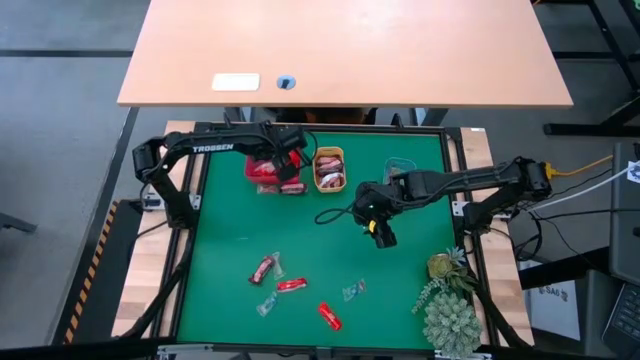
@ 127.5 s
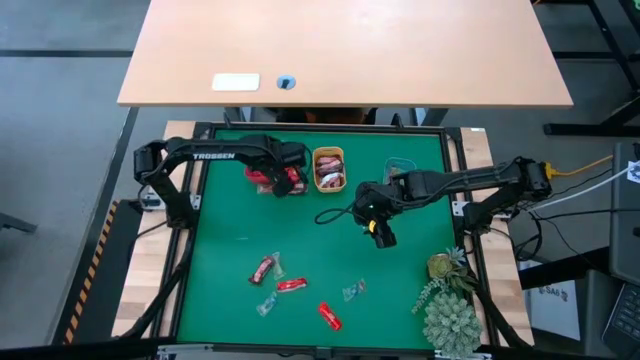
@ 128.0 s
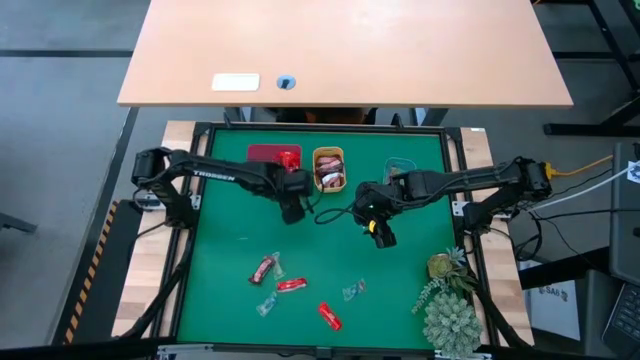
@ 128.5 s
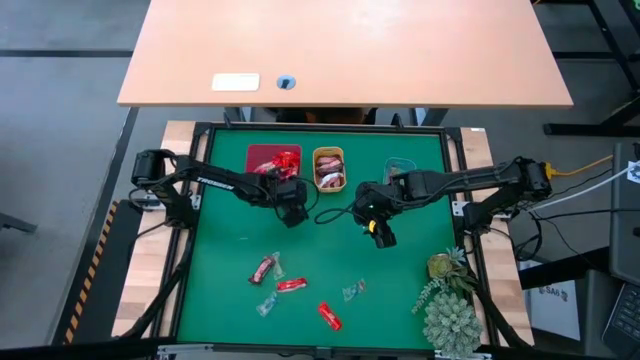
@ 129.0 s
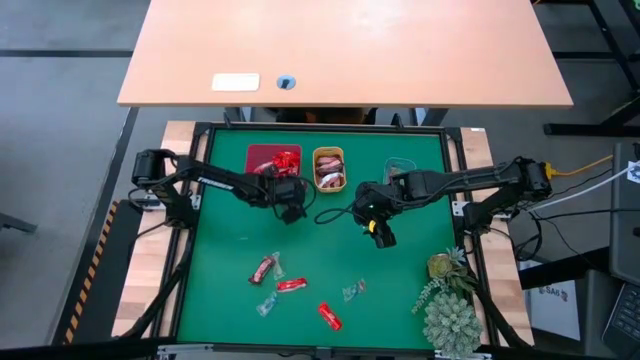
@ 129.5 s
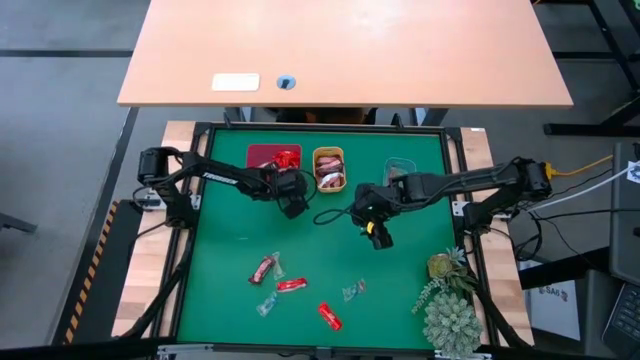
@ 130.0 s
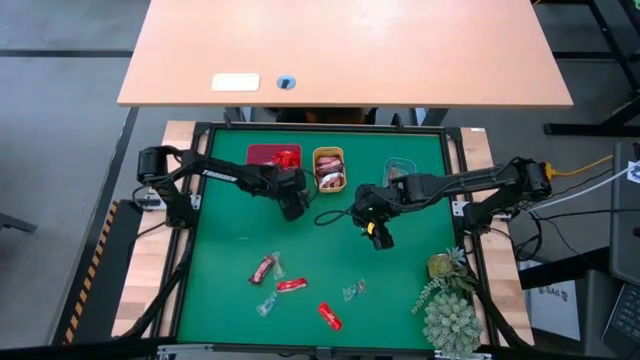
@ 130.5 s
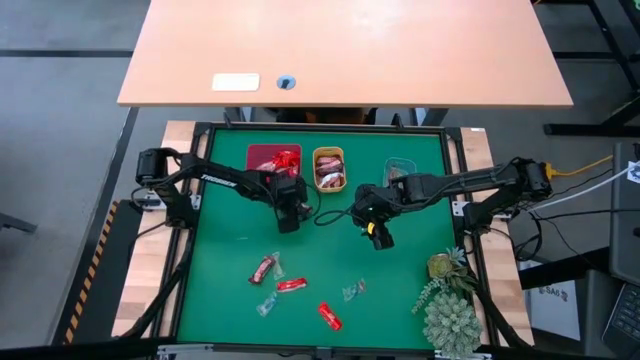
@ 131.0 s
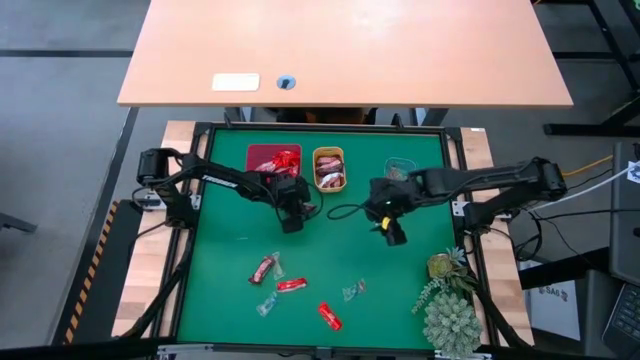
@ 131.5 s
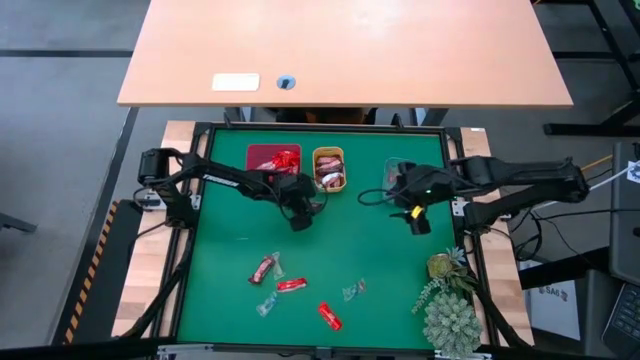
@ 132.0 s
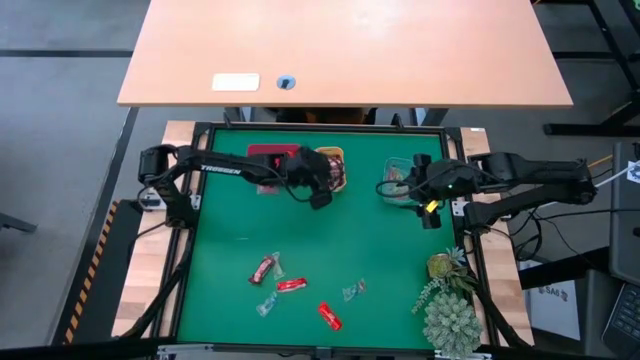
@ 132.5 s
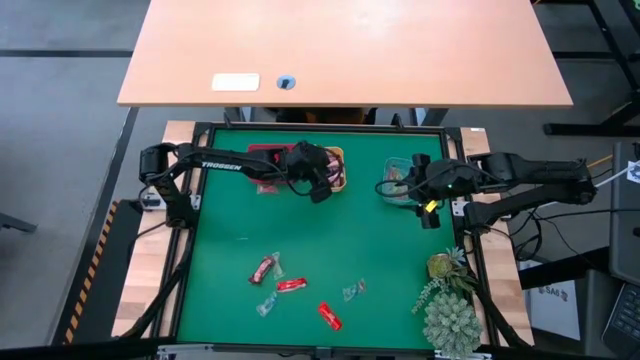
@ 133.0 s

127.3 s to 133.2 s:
Task: Sort candy
Put the brown chocolate bar into the yellow bin

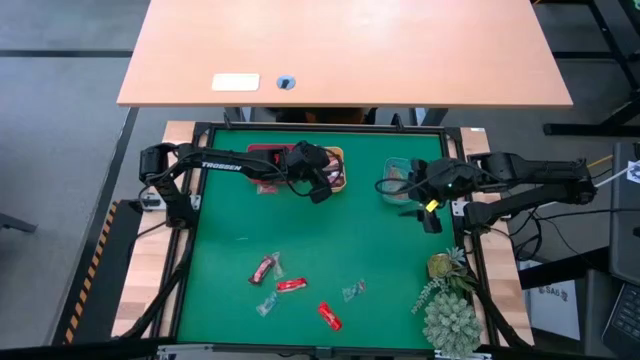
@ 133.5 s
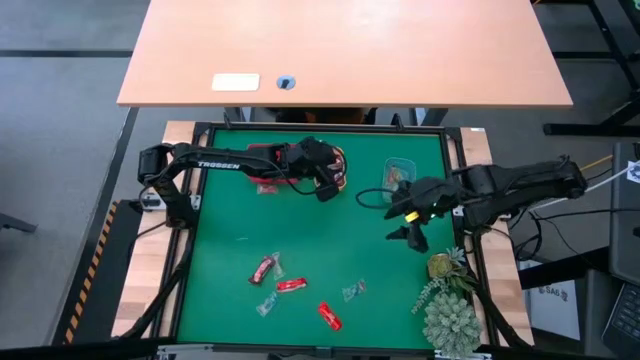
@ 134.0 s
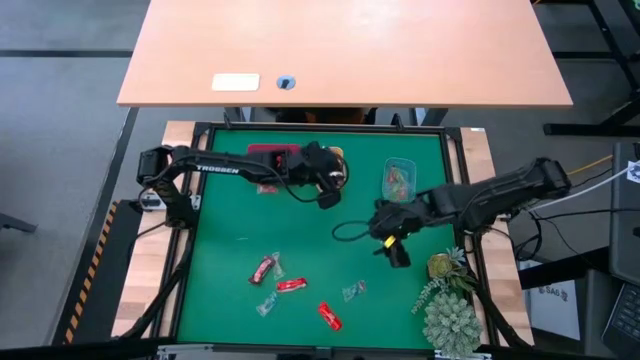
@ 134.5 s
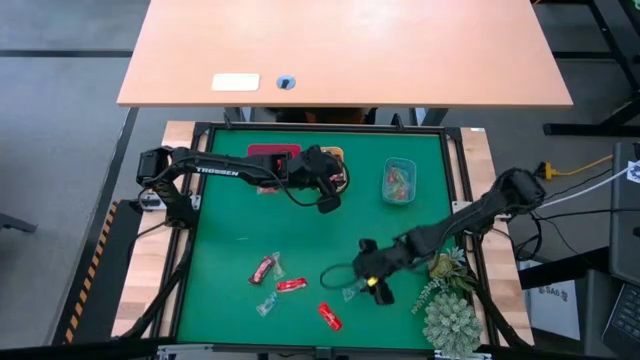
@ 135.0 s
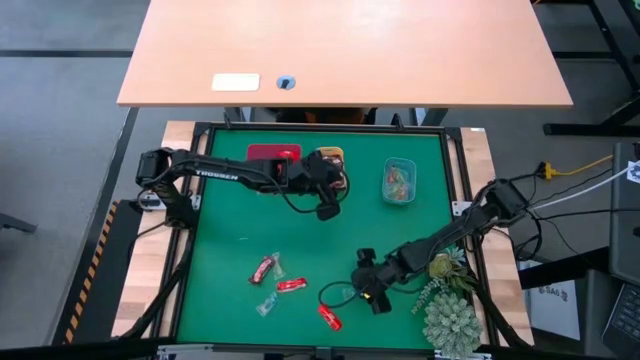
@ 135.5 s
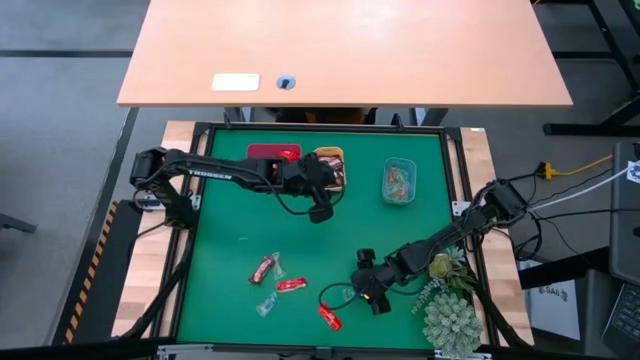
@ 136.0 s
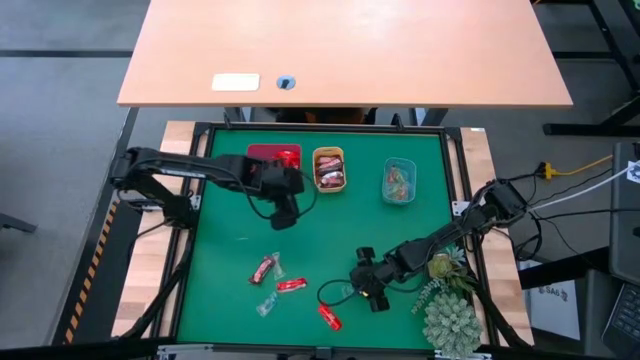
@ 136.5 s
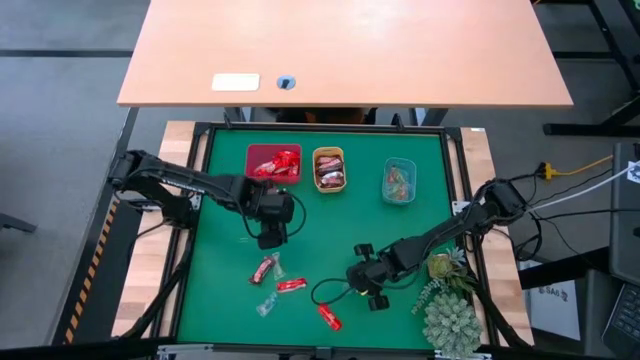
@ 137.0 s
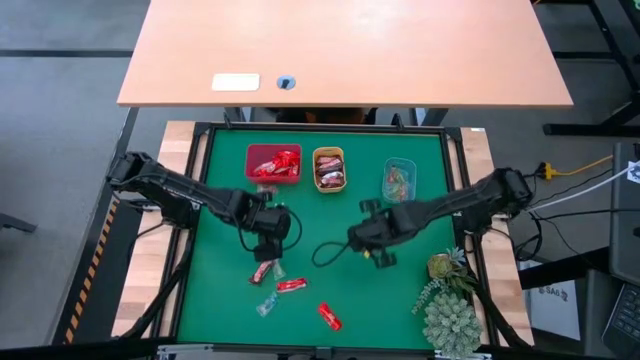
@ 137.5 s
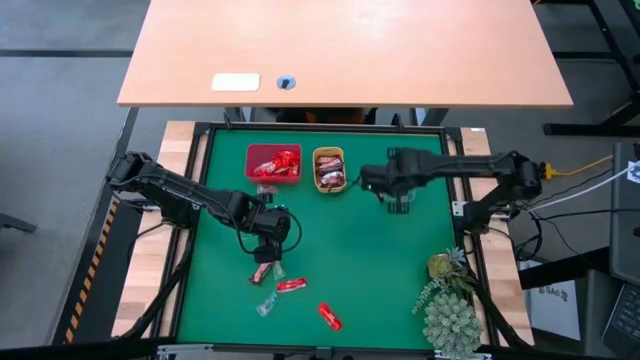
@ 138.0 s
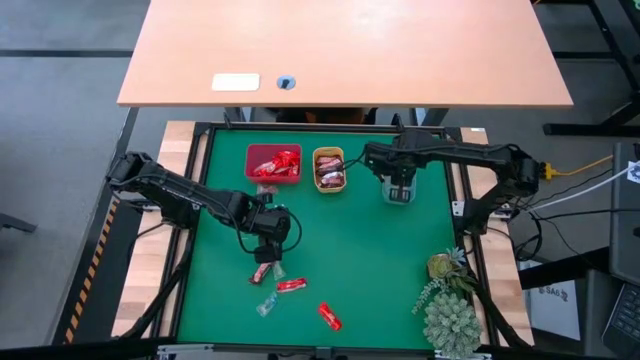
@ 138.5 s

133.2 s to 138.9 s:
Put the blue gummy into the blue bin

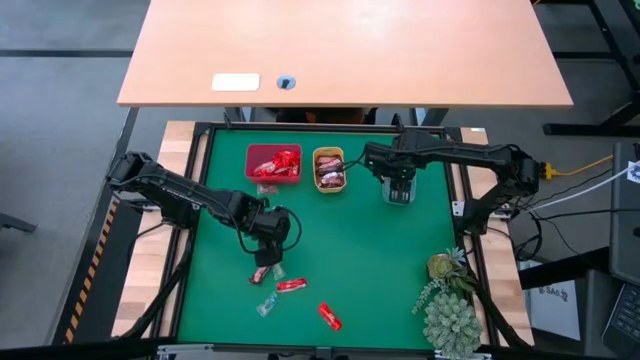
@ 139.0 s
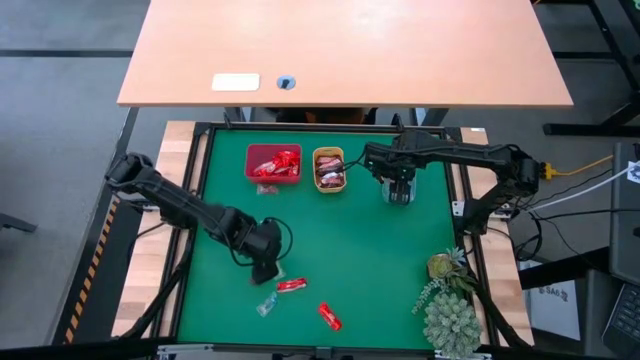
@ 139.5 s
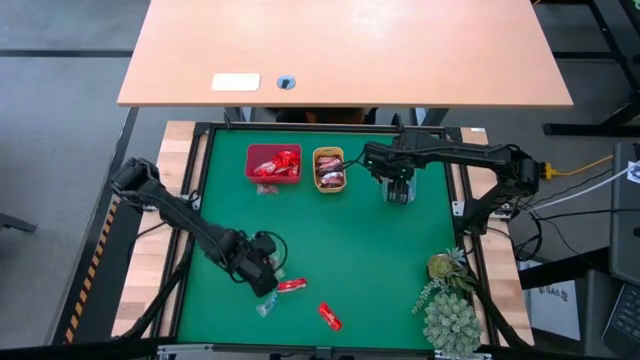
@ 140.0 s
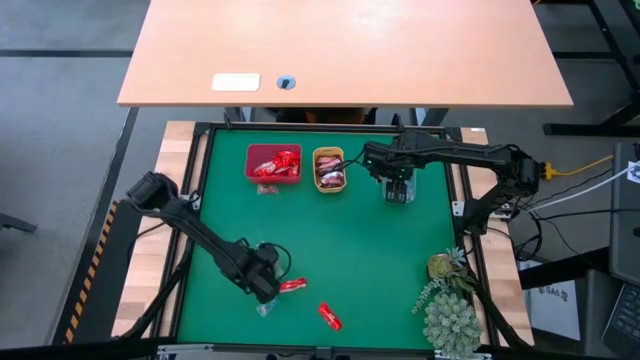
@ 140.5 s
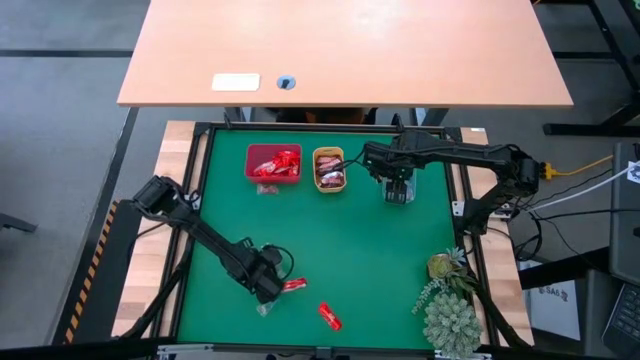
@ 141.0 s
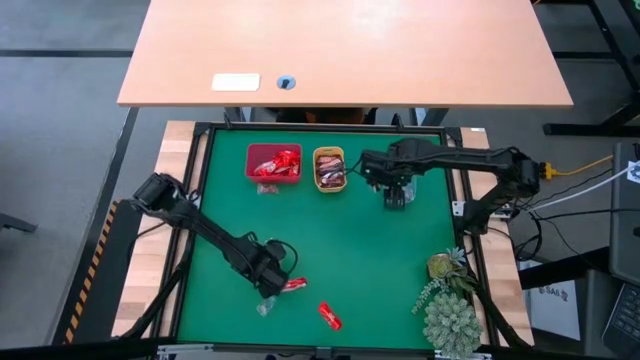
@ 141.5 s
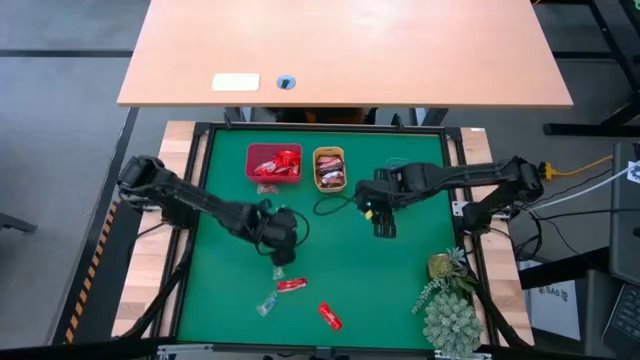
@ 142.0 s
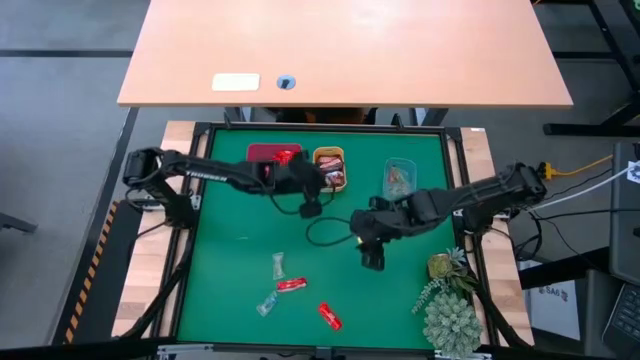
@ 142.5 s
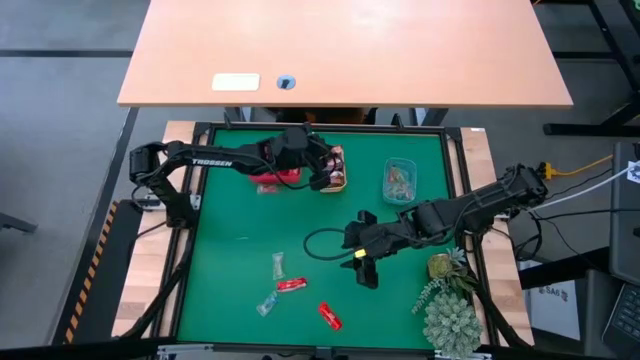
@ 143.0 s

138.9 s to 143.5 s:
Put the brown chocolate bar into the yellow bin

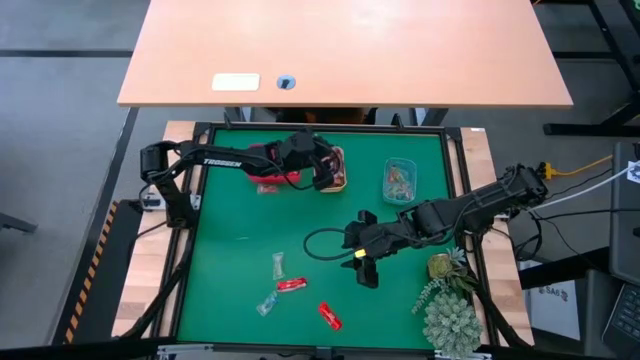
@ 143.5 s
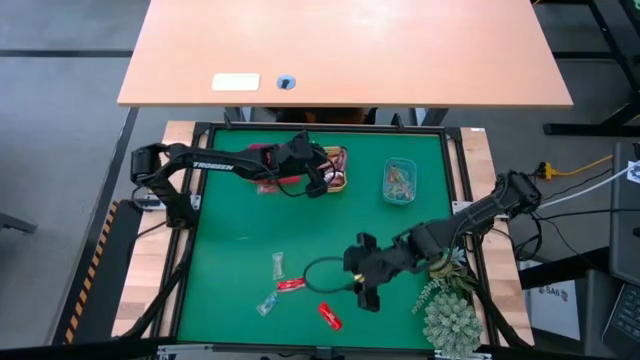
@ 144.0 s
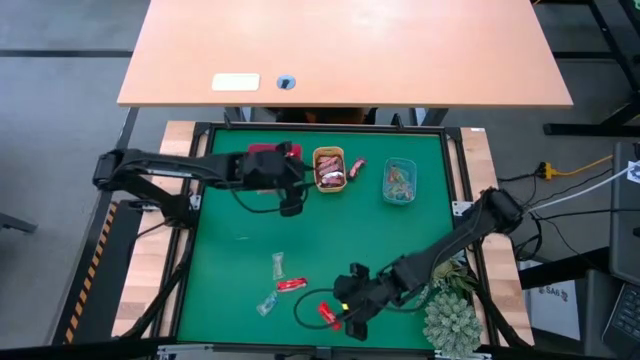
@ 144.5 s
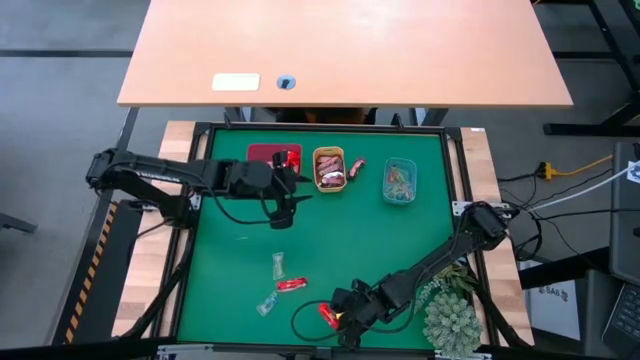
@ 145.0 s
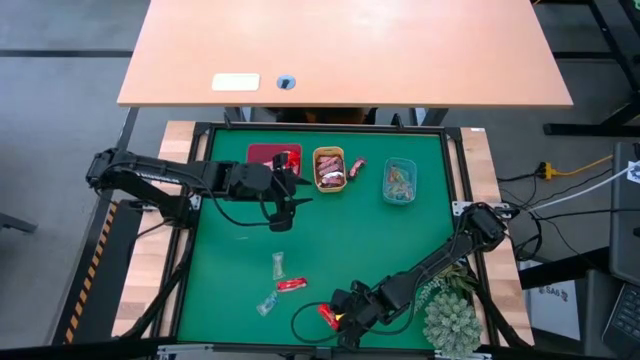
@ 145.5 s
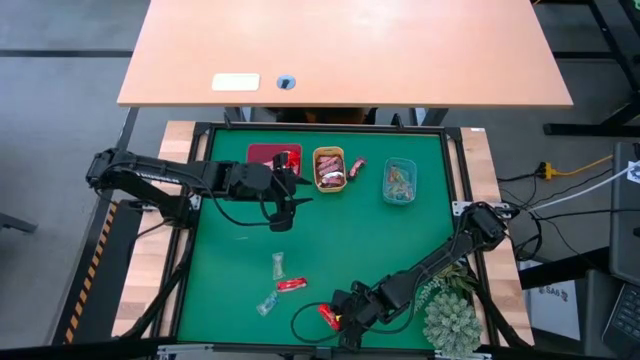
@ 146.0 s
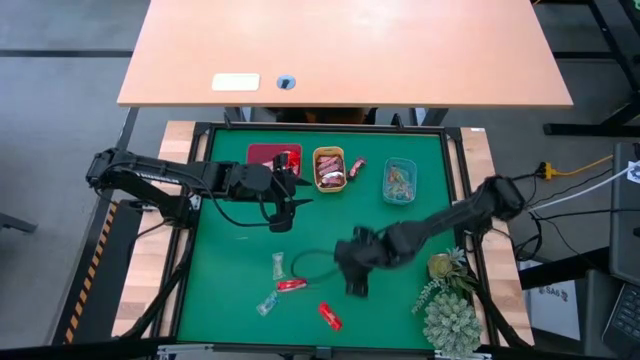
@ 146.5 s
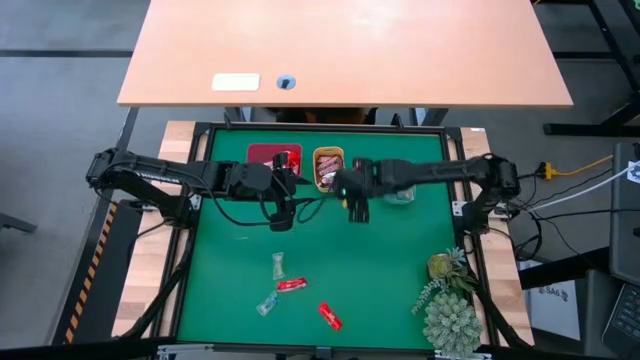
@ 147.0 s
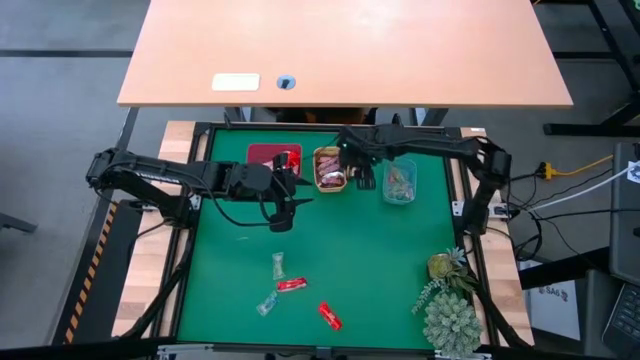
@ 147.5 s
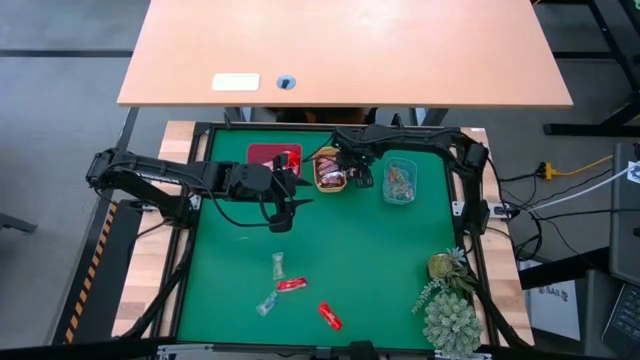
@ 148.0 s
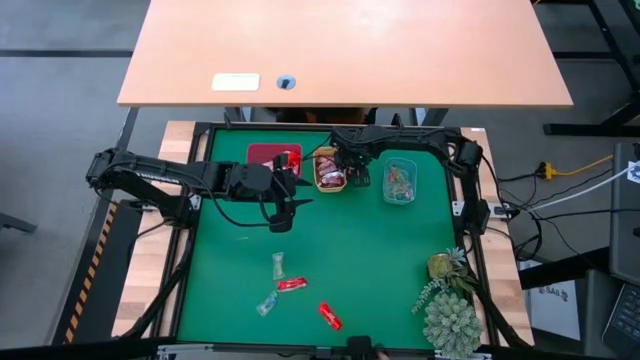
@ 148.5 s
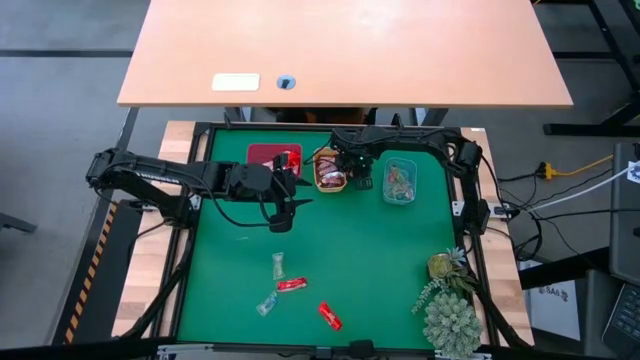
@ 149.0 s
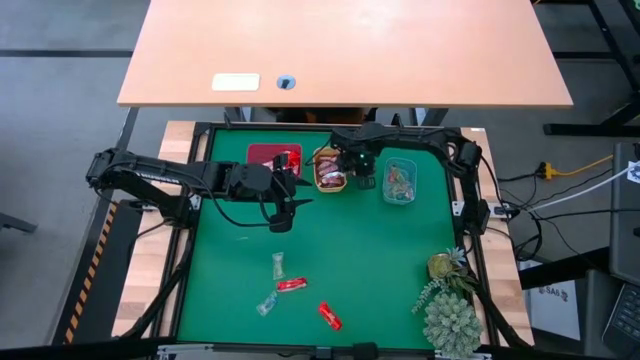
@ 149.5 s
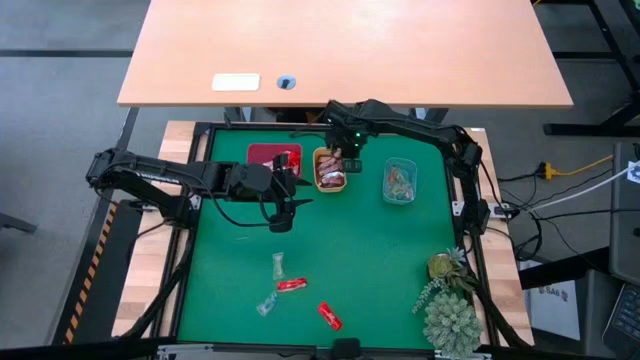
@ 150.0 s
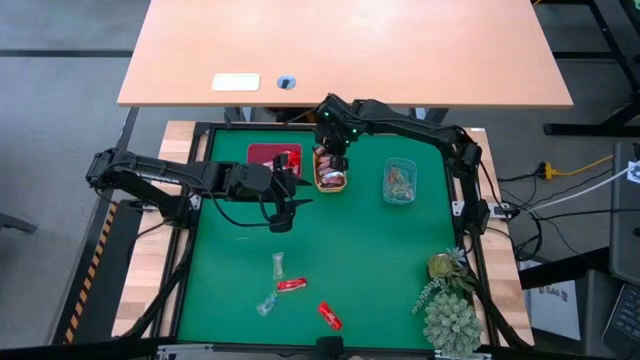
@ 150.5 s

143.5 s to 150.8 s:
Put the brown chocolate bar into the yellow bin
